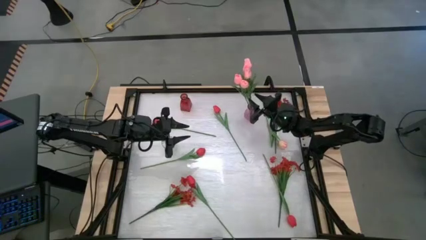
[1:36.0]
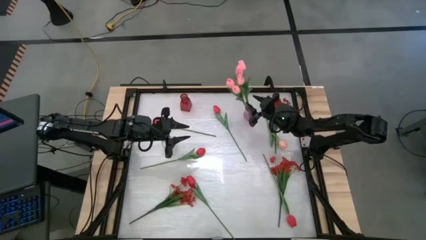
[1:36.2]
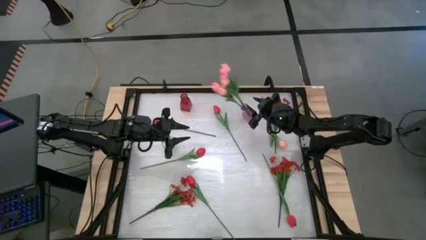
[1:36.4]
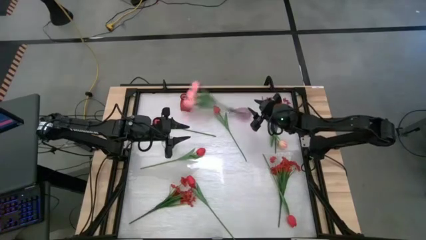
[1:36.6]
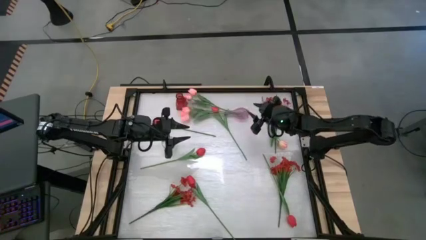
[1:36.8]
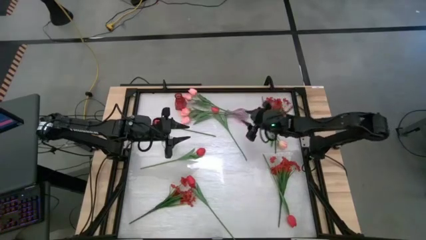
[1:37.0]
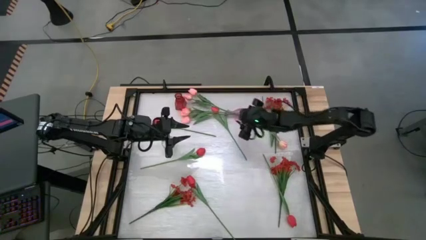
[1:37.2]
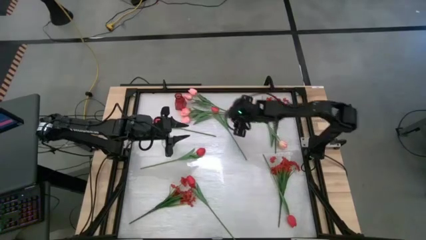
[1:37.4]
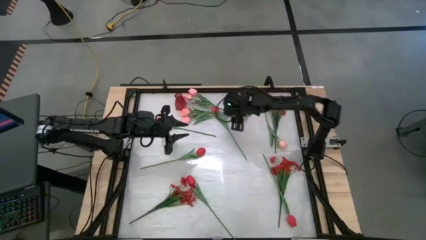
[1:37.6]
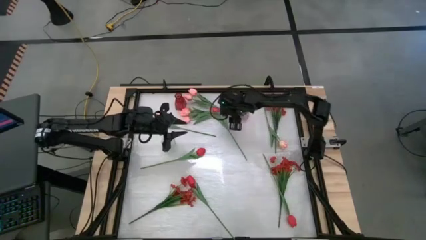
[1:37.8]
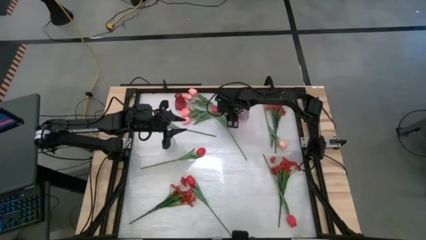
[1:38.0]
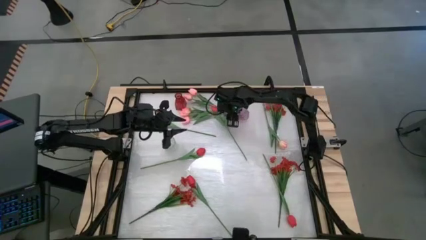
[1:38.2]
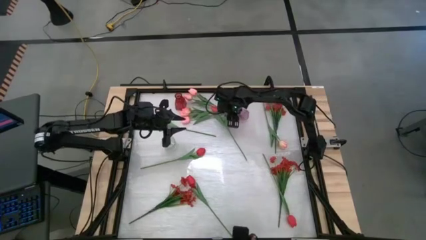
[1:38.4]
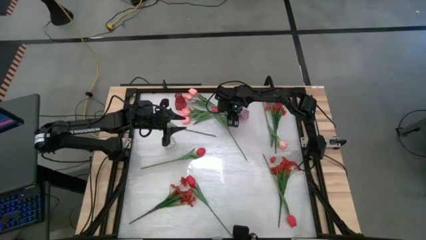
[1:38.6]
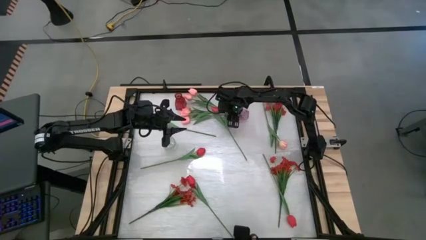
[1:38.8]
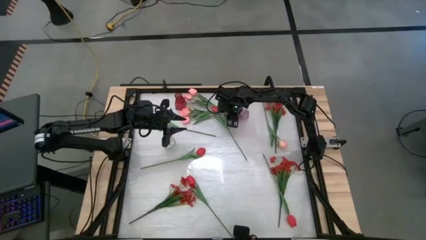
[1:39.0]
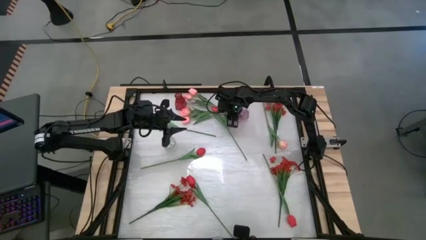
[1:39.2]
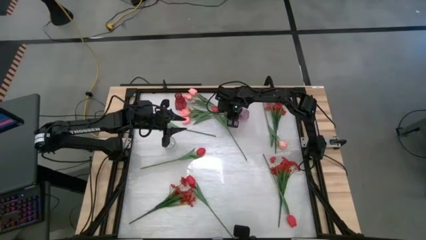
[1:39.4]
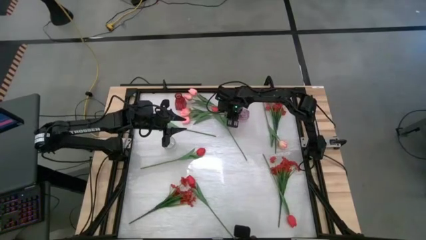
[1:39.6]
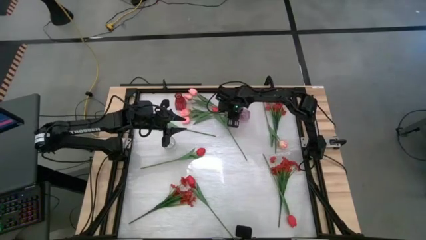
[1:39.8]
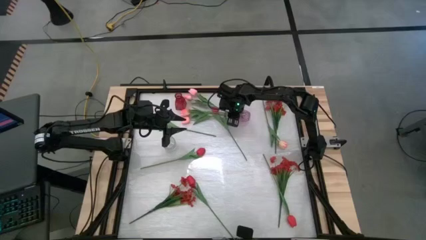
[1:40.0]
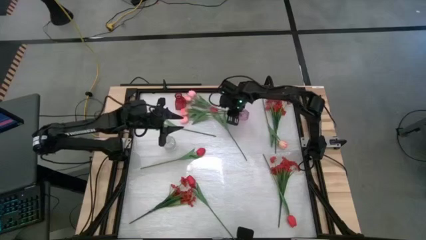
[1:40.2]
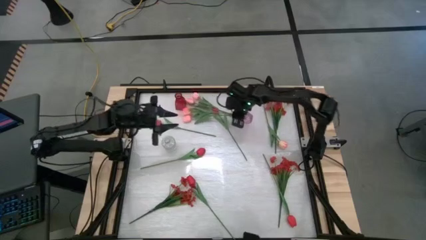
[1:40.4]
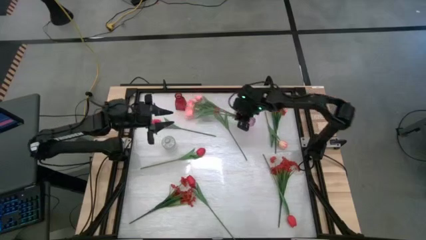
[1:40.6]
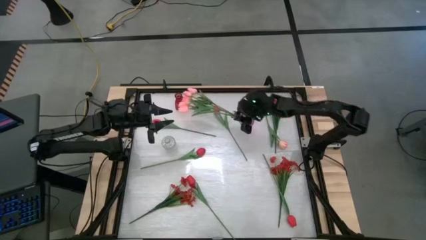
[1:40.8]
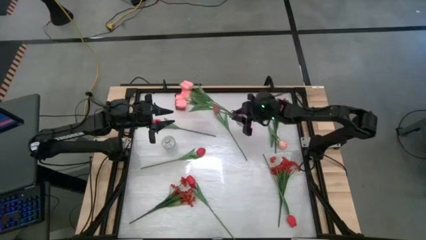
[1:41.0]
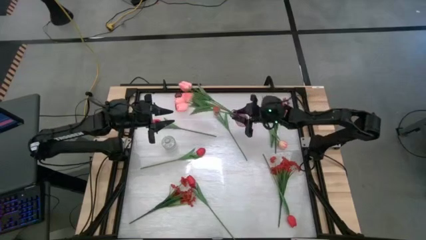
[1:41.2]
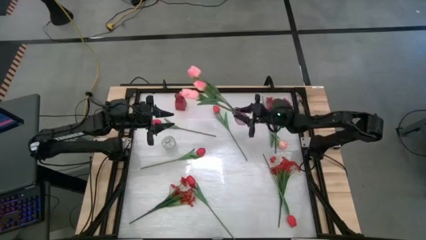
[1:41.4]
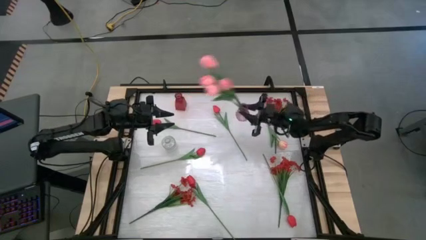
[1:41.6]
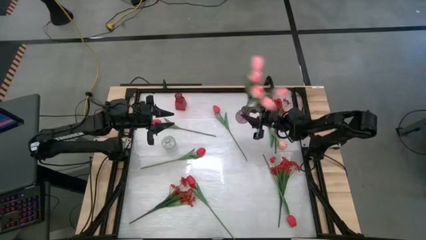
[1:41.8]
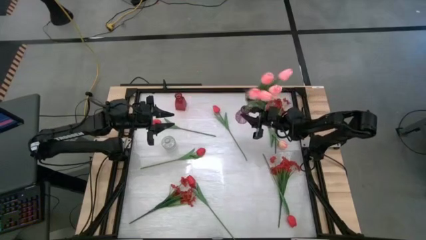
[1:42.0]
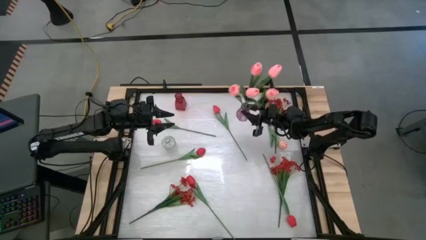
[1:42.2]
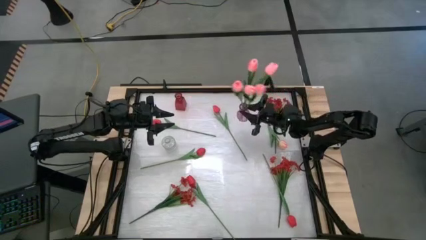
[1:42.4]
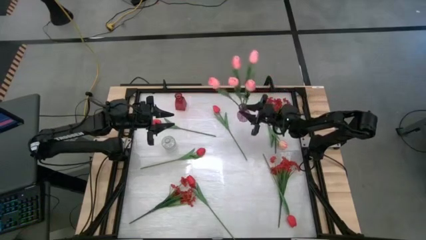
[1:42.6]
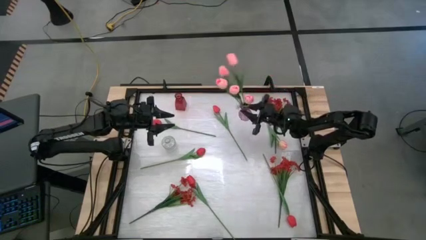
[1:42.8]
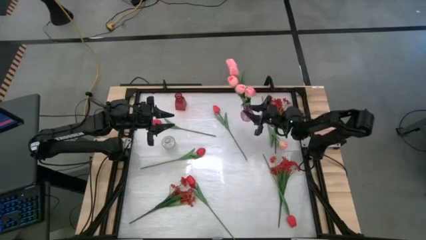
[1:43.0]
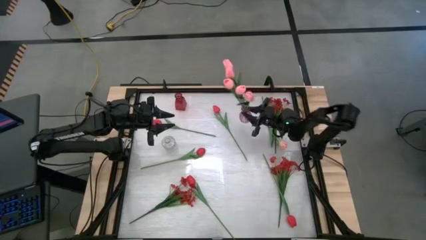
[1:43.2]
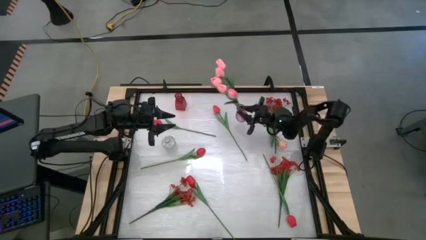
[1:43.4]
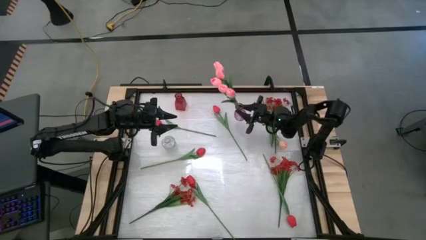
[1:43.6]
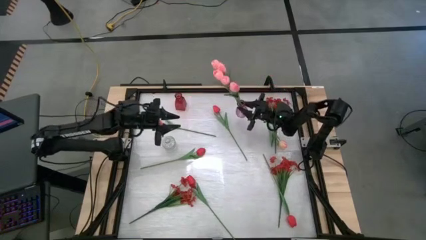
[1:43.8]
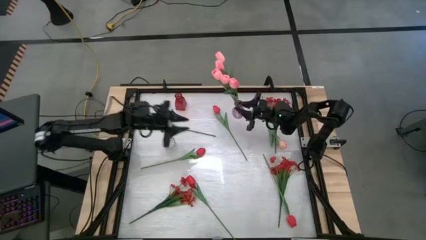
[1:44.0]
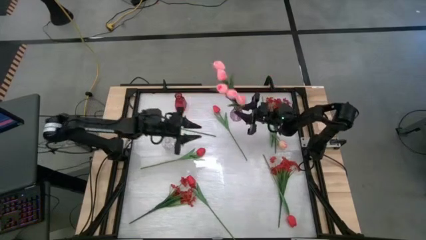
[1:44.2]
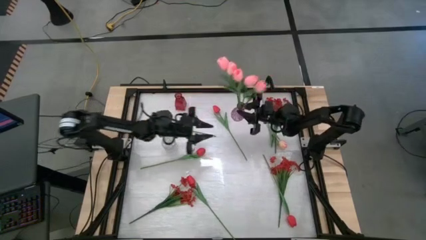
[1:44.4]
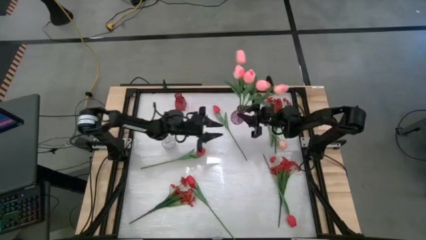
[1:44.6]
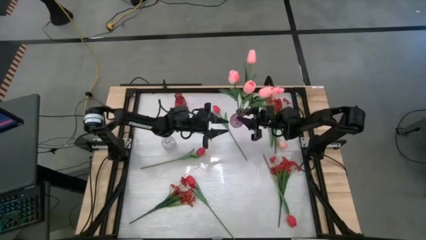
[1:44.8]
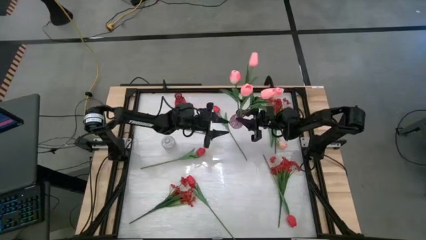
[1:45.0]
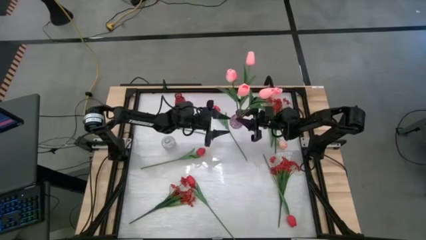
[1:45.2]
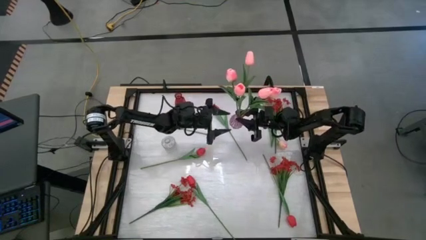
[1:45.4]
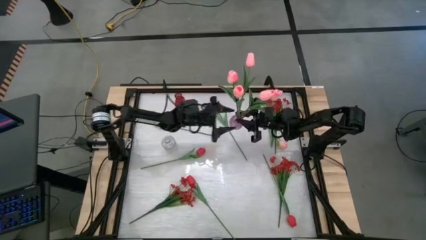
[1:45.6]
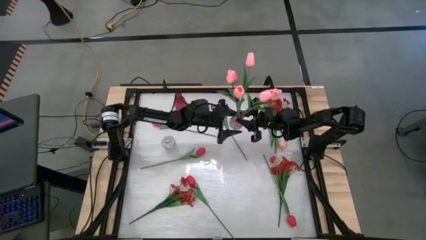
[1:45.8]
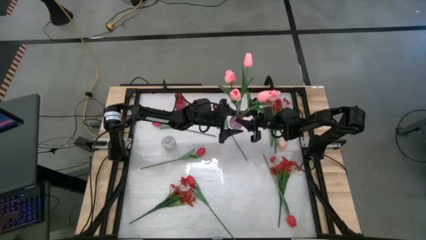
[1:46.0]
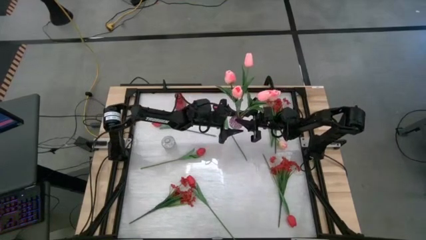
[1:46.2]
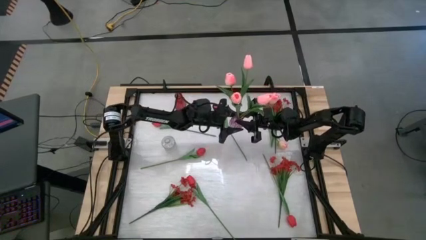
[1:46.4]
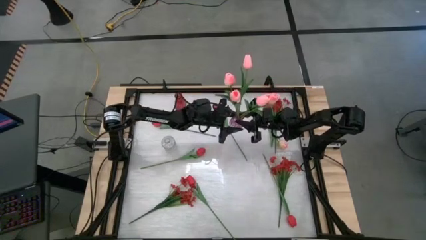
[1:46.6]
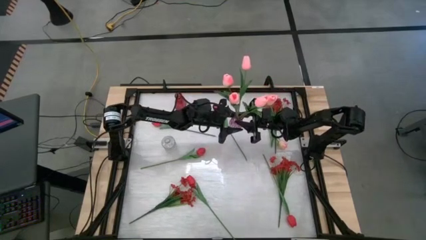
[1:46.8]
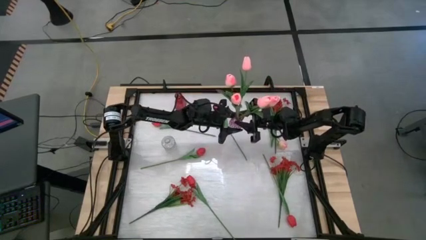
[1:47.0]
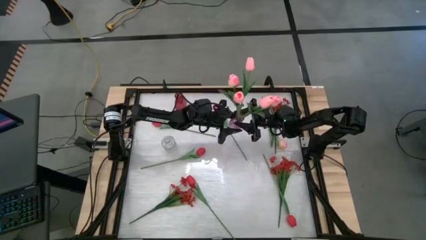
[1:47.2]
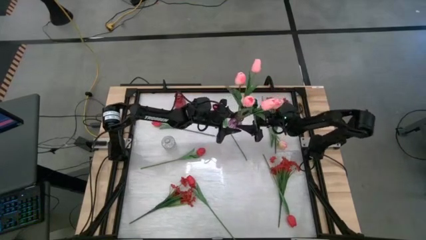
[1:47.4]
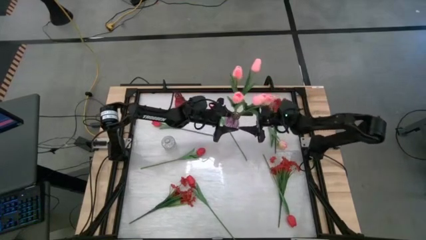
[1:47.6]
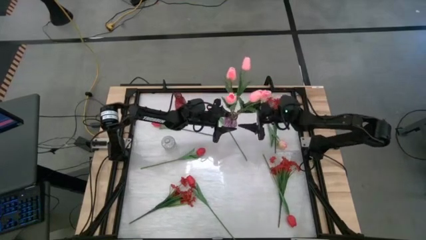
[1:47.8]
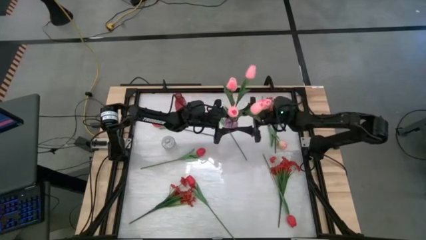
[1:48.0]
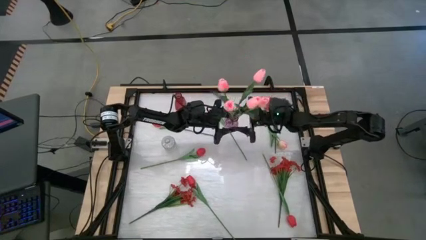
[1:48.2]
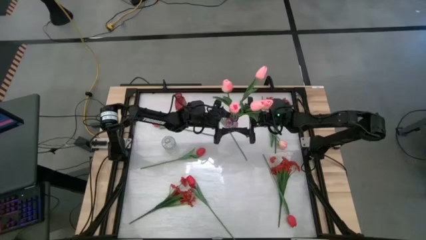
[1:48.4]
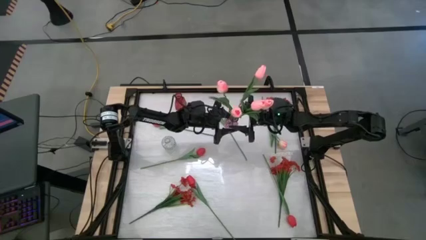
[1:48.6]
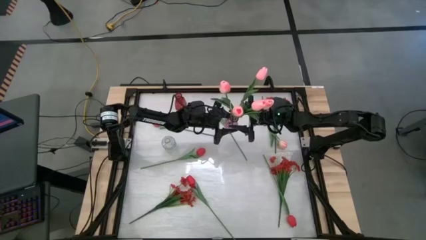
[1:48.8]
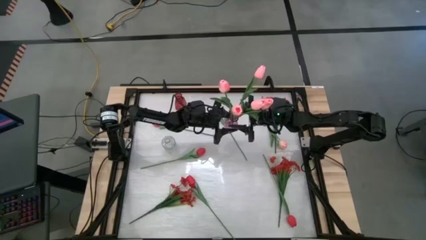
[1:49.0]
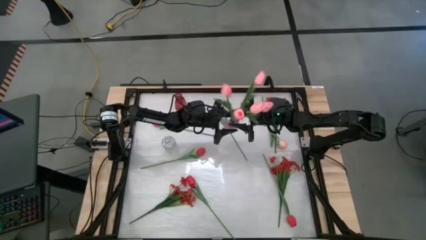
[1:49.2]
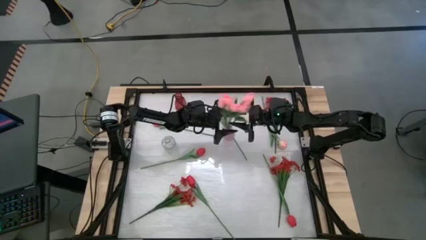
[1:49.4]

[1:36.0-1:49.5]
Task: Sort flowers into vase by color
Adjust the purple vase

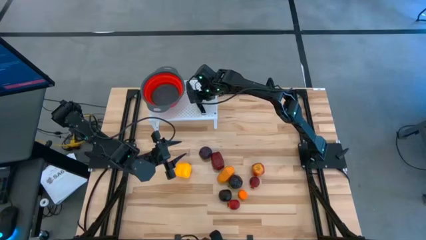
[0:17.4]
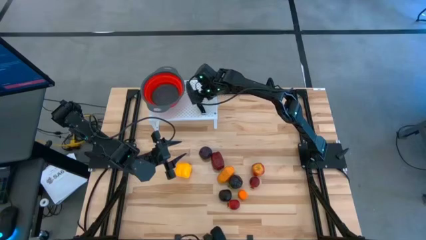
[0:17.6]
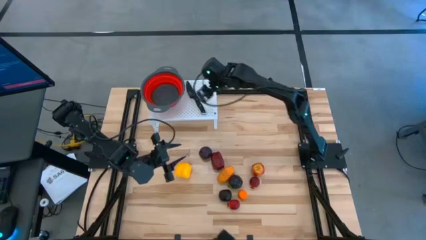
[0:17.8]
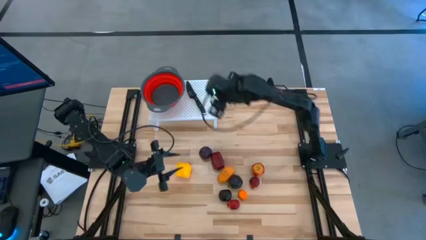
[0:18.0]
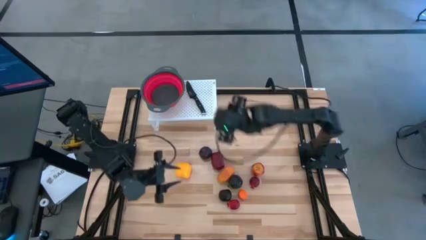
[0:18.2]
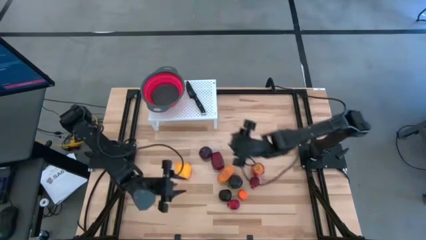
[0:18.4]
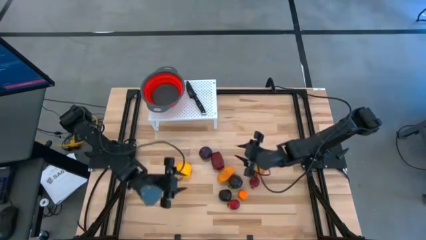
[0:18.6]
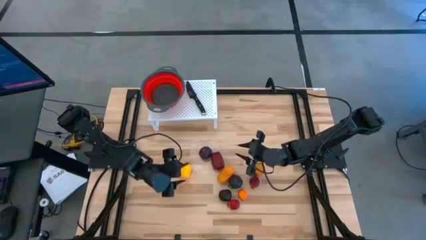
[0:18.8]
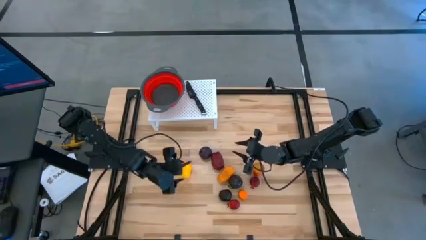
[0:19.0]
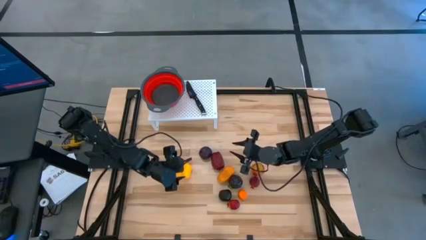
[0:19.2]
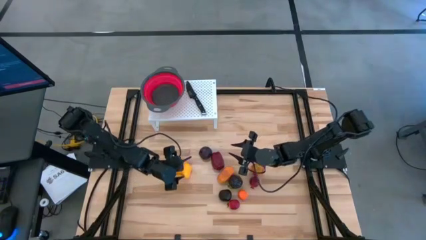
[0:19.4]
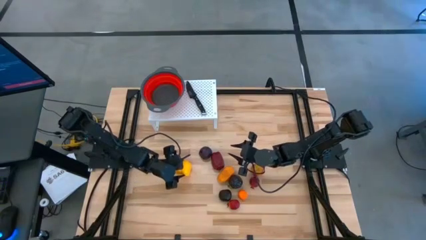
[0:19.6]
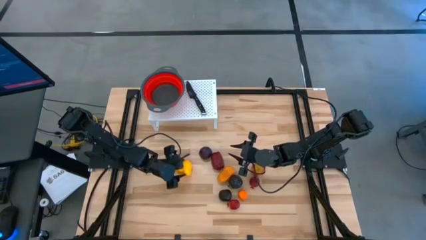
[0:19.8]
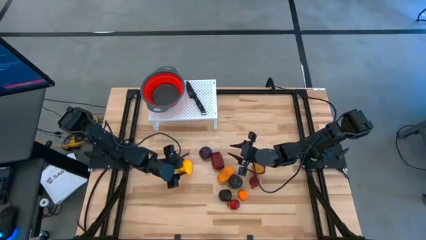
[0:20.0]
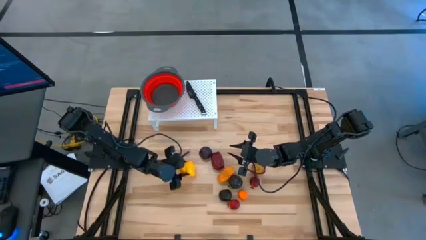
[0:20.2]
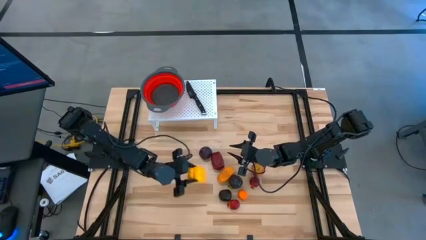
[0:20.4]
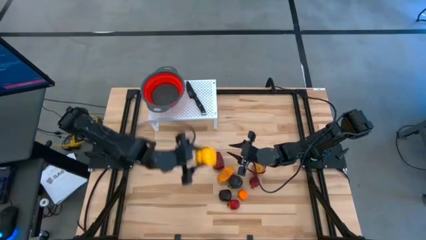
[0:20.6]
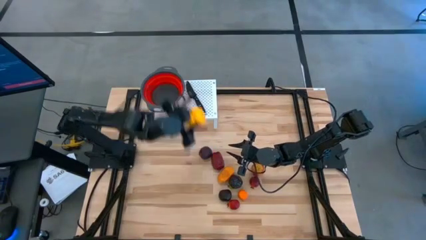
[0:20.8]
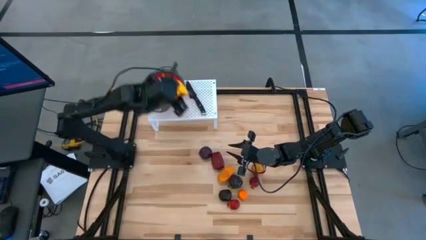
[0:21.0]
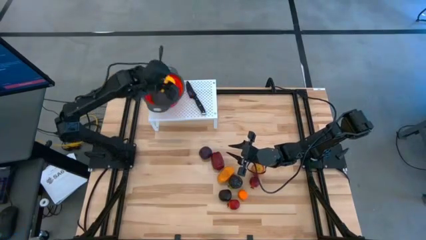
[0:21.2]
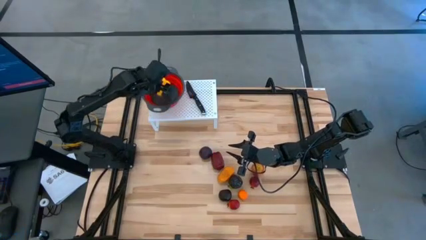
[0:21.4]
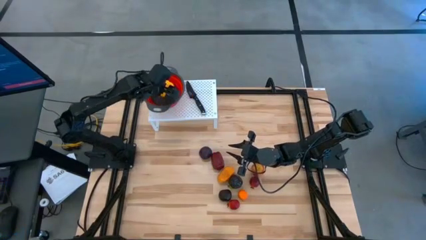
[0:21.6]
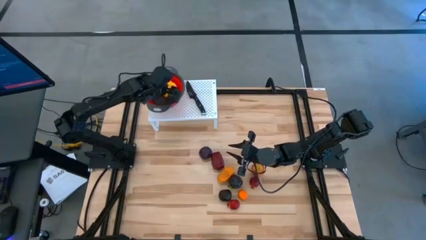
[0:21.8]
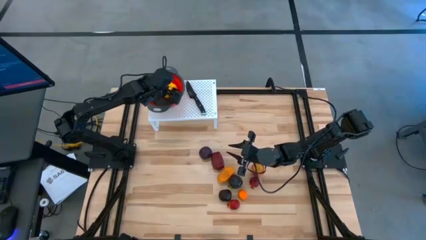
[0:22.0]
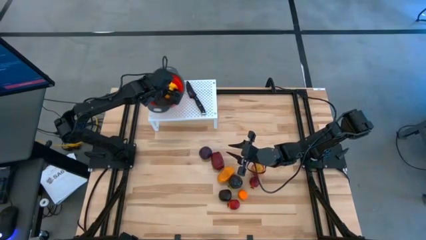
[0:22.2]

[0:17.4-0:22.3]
Task: Pick & Place Fruit
Put the yellow bell pepper into the red strainer bowl on the shelf
